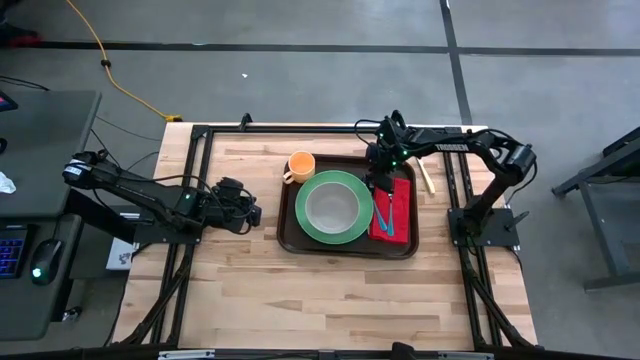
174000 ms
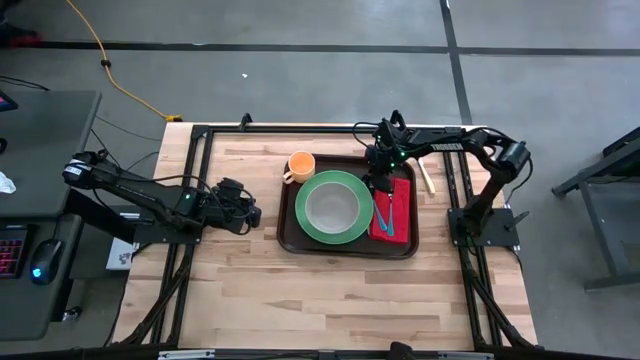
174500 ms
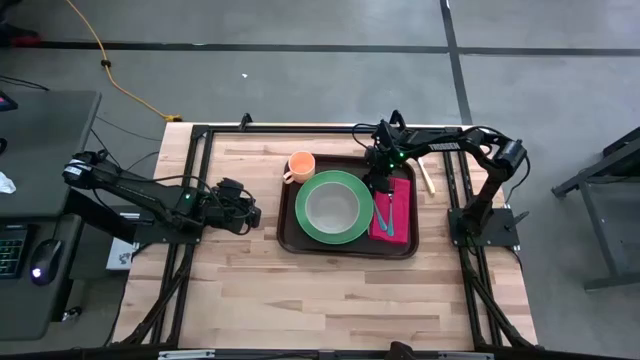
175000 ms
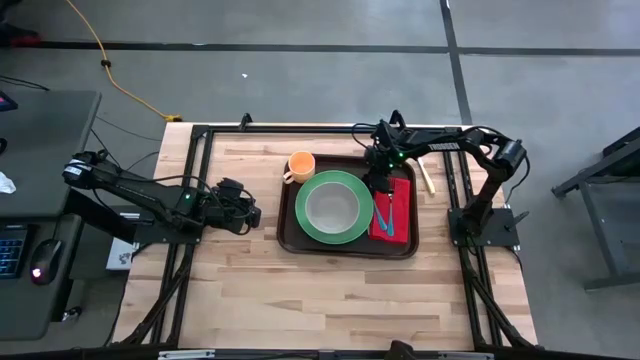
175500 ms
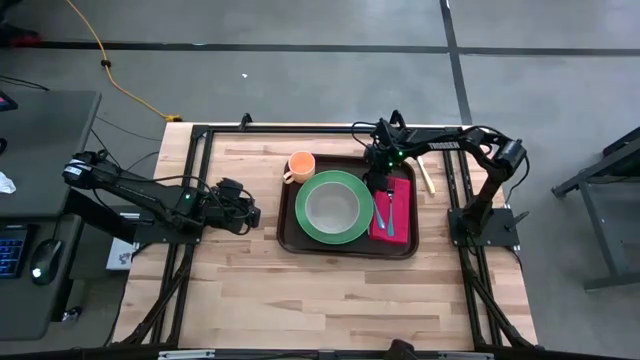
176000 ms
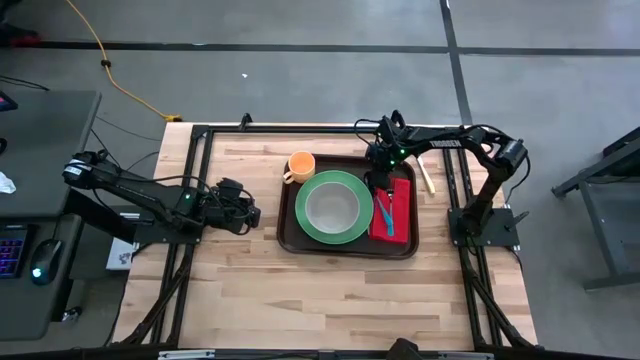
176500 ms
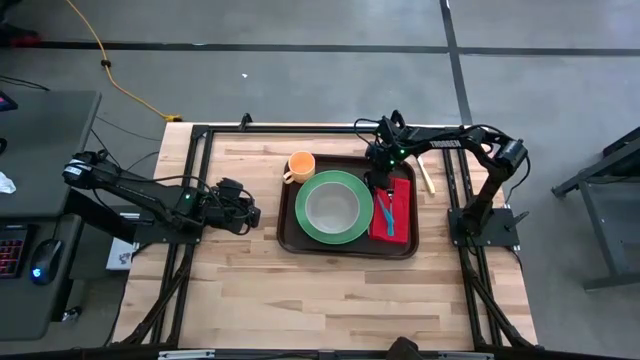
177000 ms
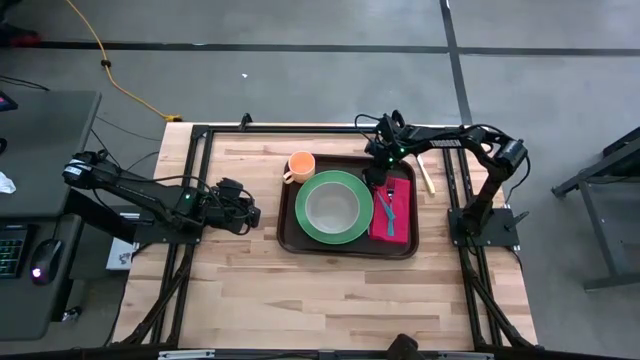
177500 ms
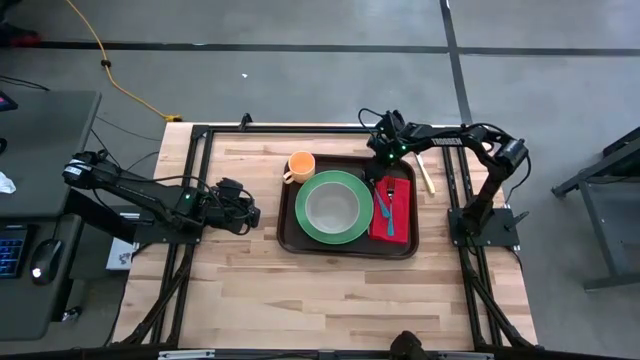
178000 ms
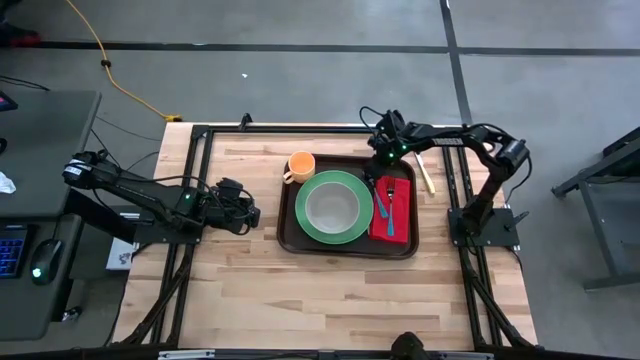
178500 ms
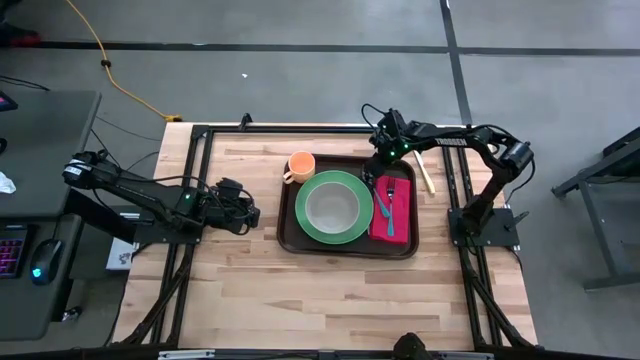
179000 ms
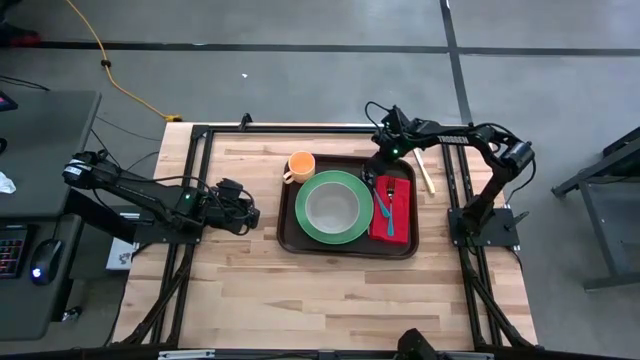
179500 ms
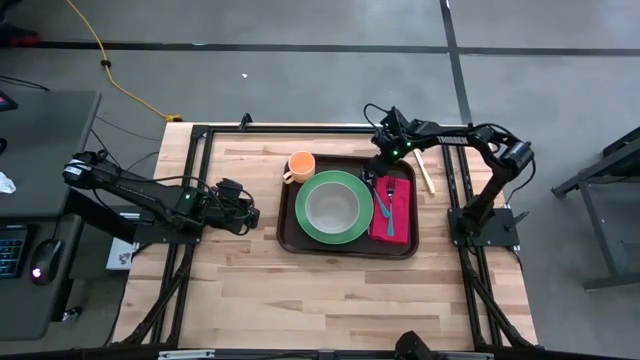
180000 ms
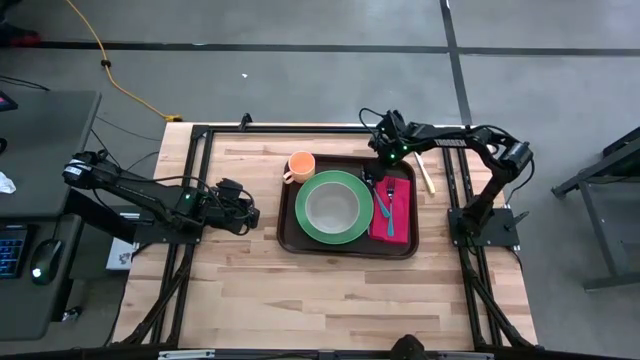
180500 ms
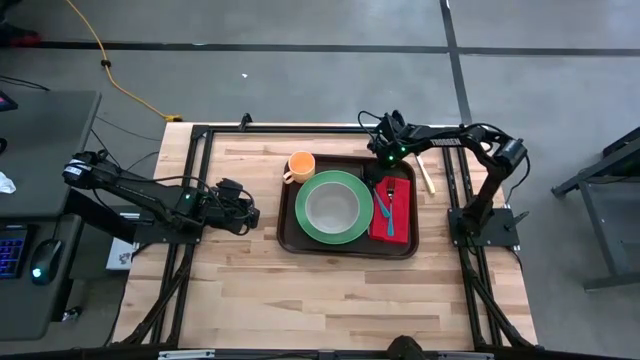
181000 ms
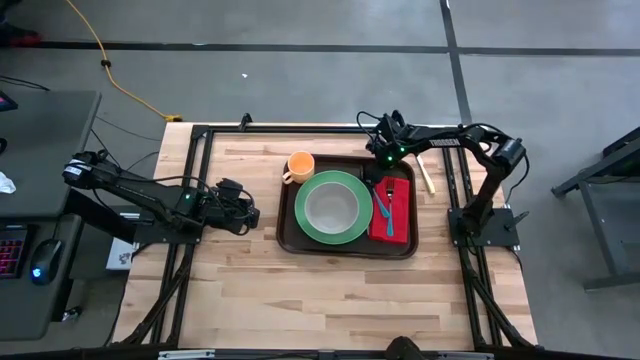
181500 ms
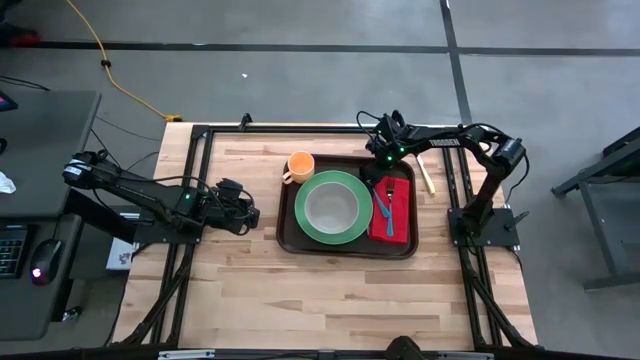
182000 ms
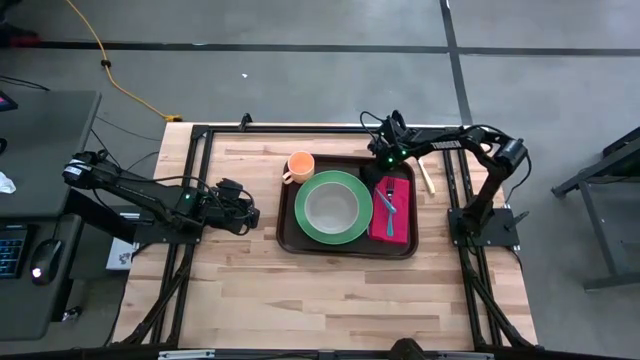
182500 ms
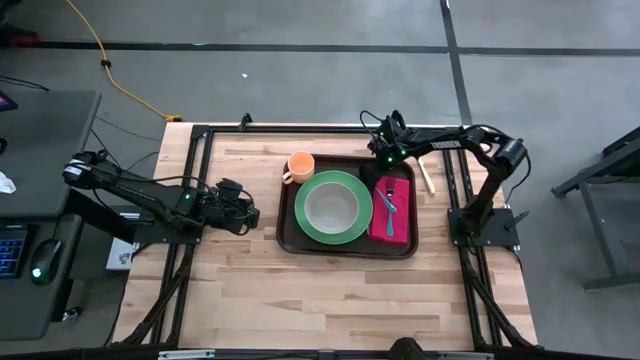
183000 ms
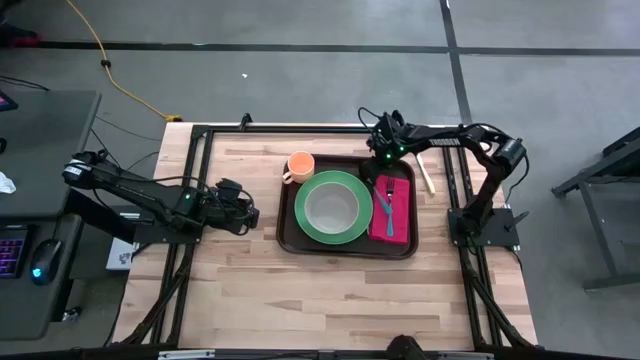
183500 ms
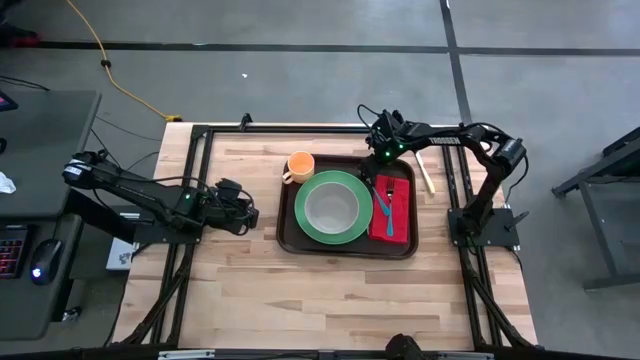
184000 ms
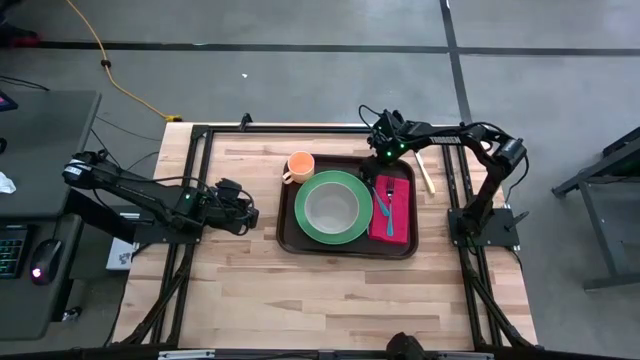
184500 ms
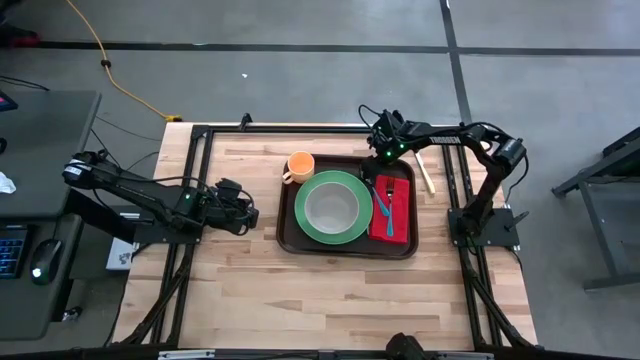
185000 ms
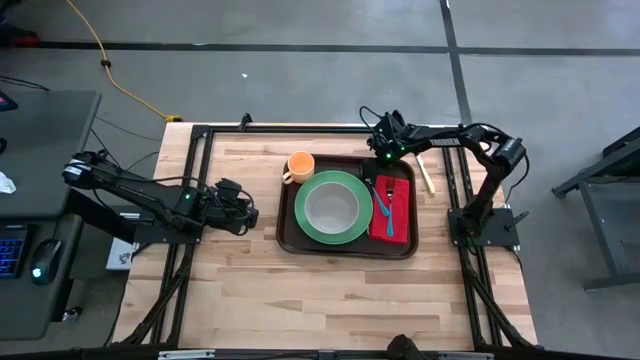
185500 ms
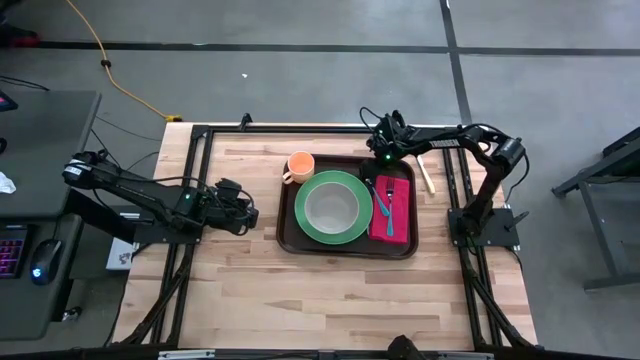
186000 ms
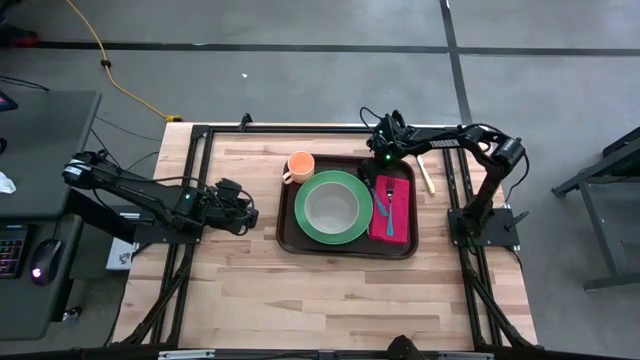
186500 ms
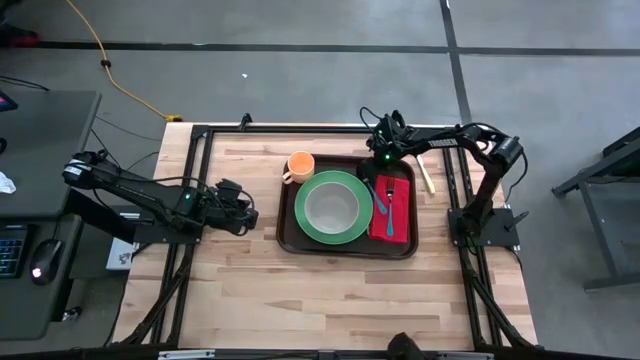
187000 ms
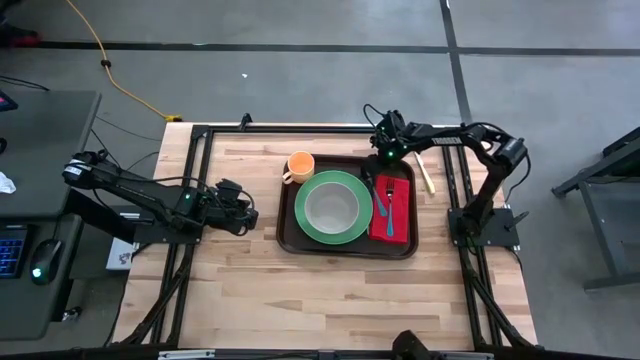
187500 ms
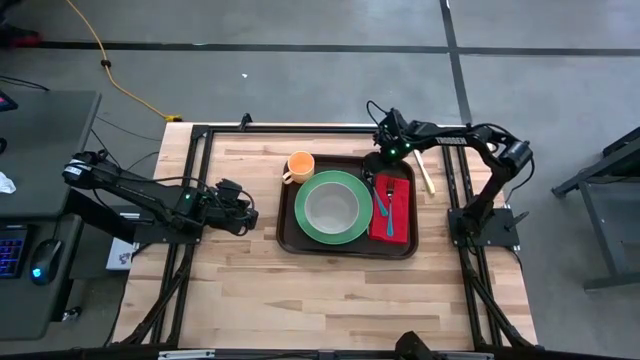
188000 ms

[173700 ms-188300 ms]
Task: Set up tray
Put the blue spoon on the red napkin to the left of the blue fork

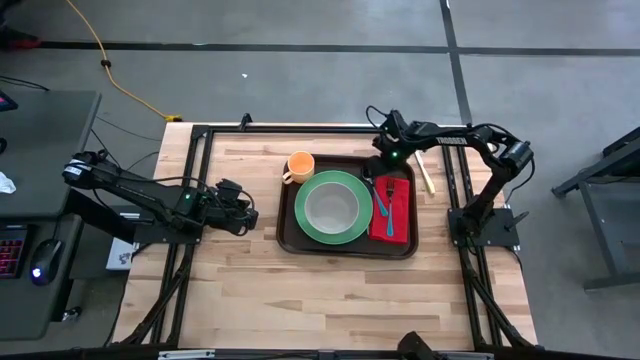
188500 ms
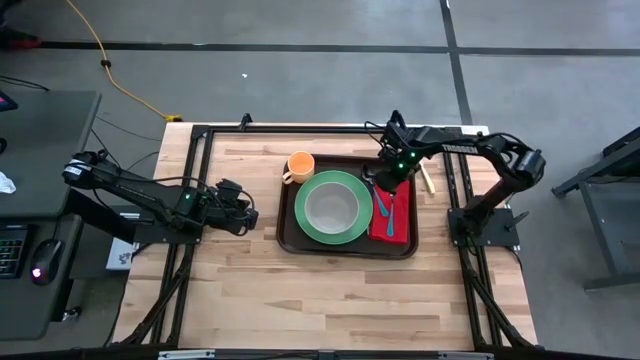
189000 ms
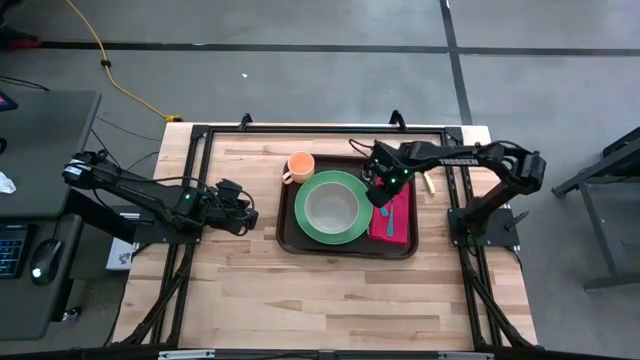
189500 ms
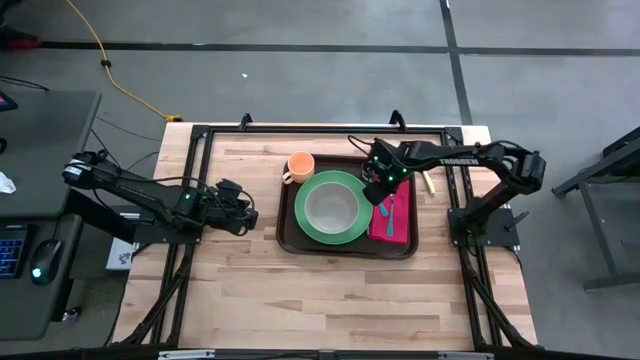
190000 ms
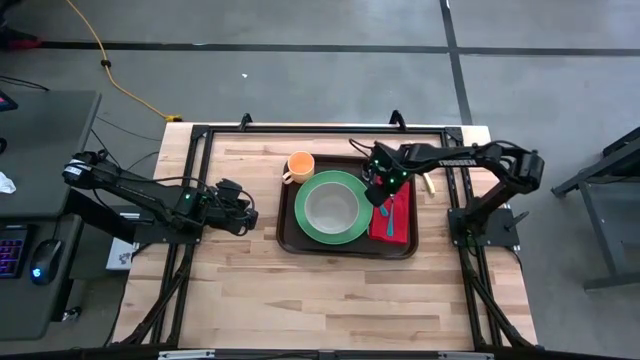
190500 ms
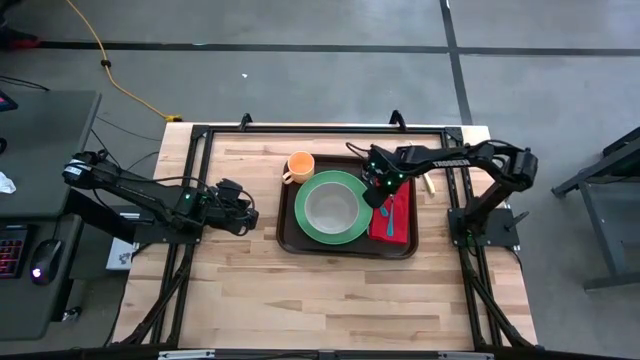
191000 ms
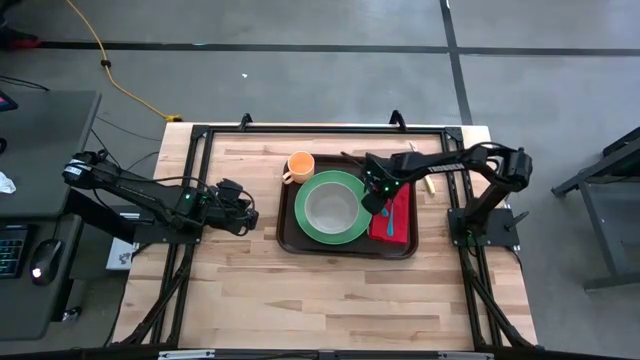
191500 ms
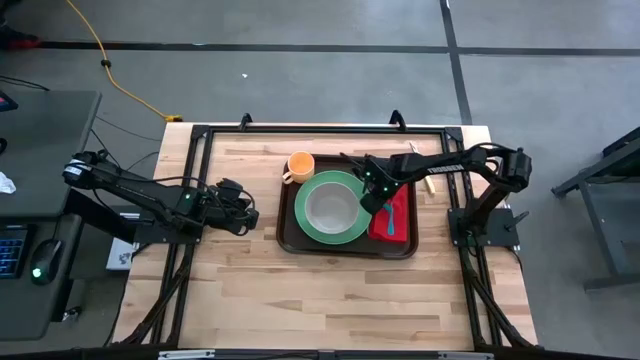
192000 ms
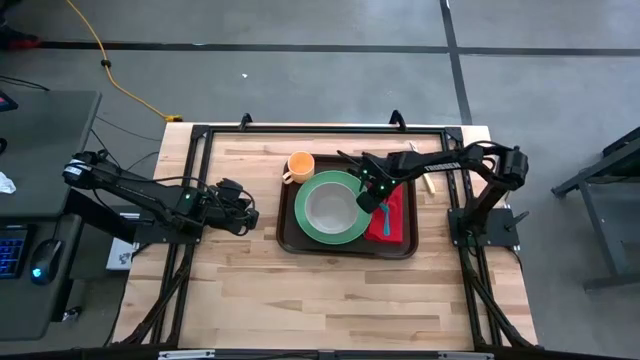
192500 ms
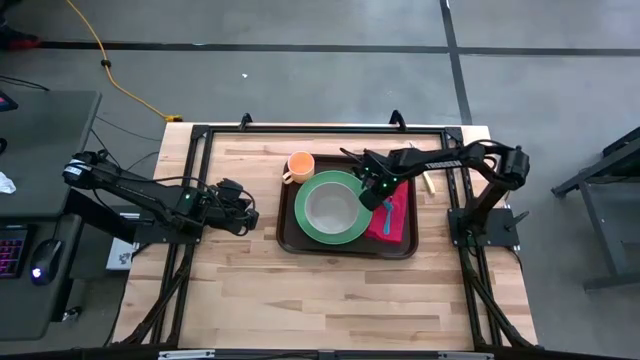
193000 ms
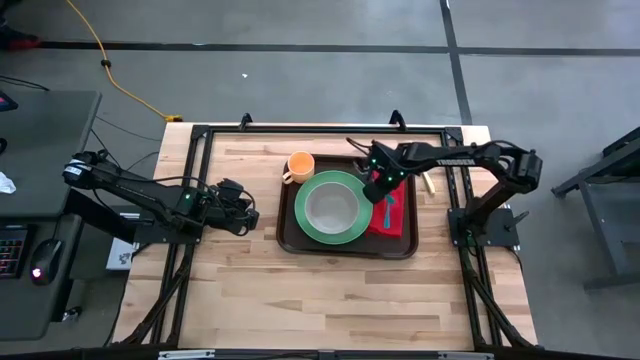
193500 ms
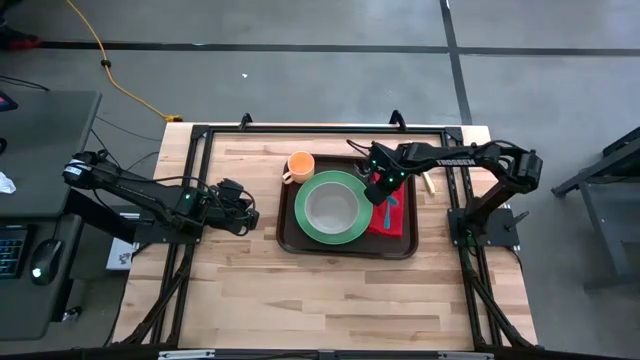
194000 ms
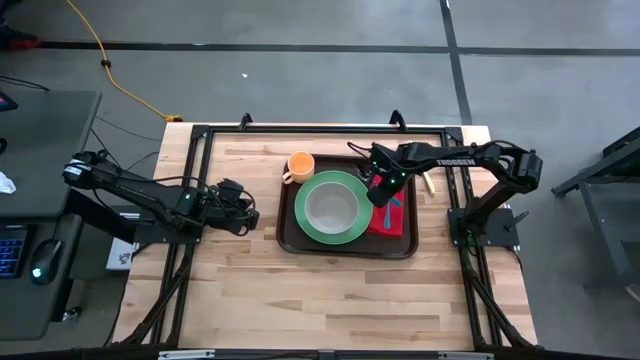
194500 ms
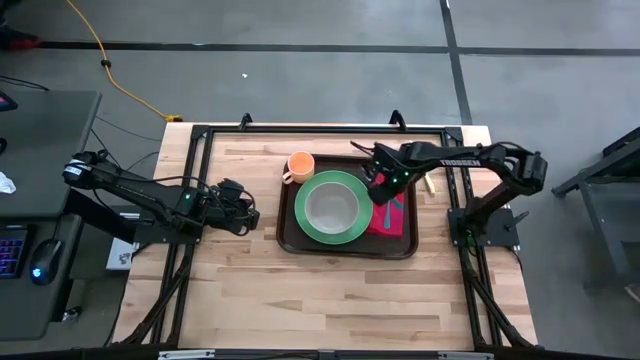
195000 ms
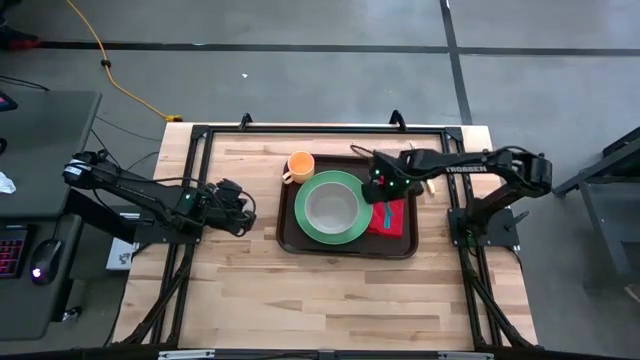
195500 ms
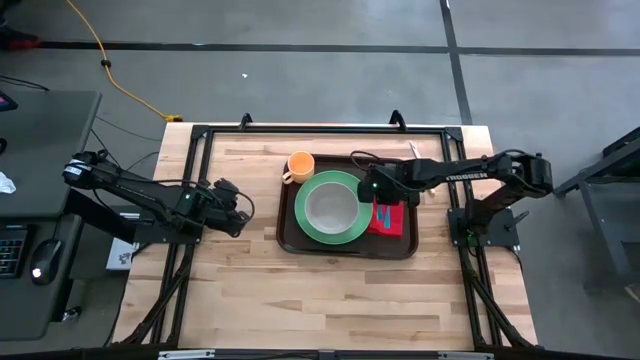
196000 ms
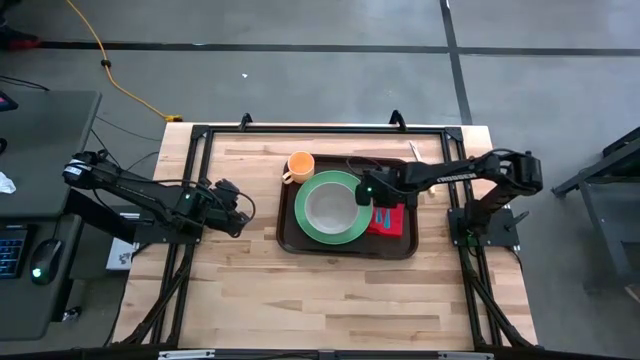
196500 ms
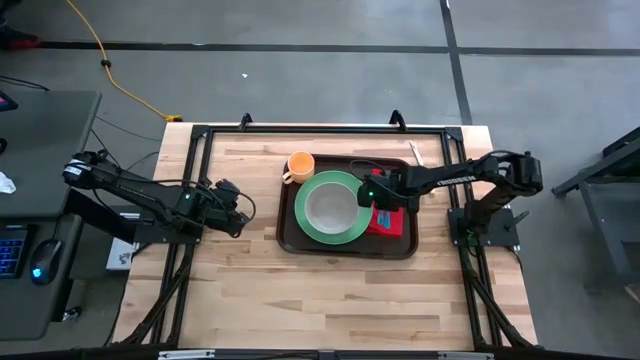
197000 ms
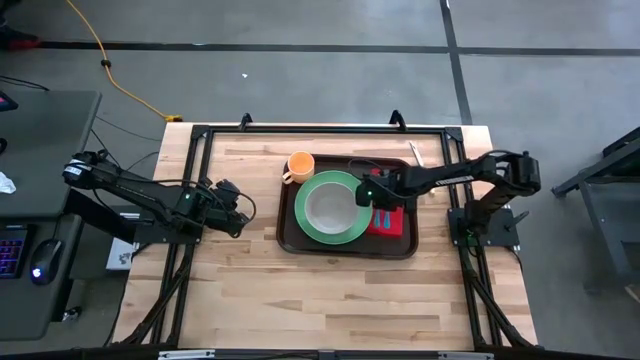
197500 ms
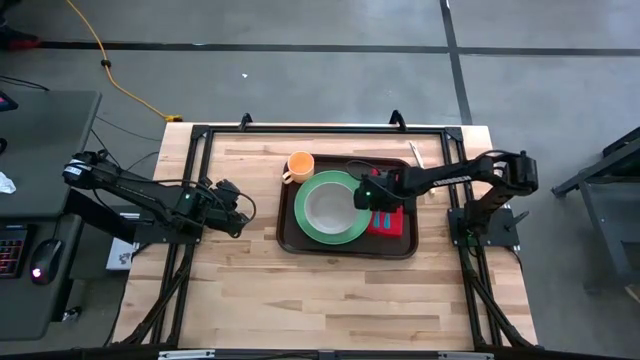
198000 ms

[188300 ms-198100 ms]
Put the blue spoon on the red napkin to the left of the blue fork
